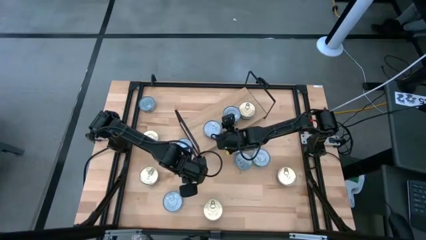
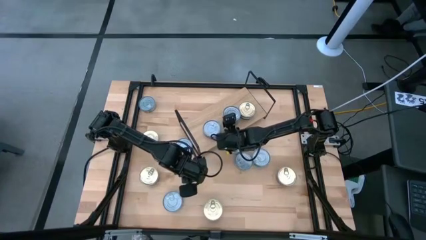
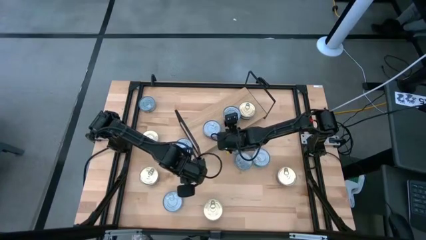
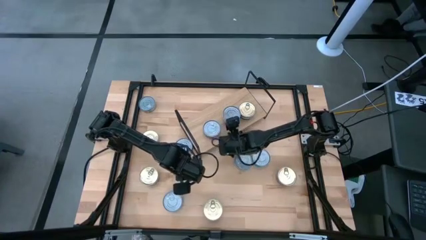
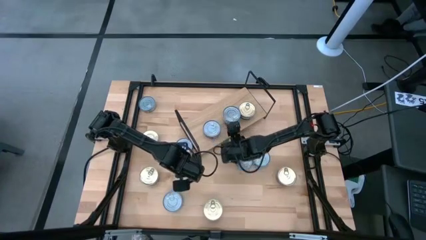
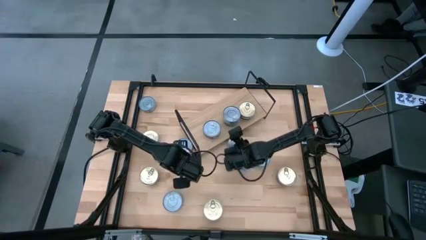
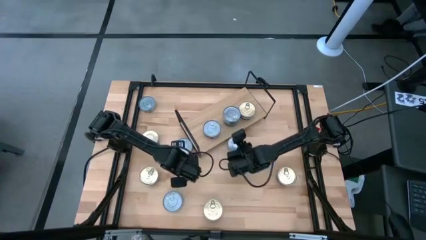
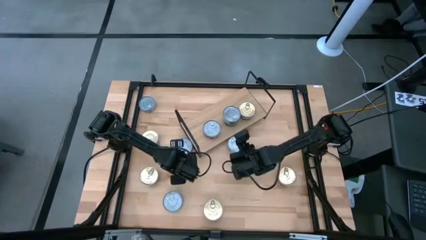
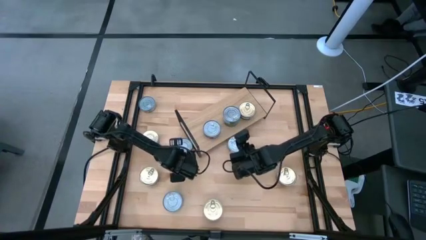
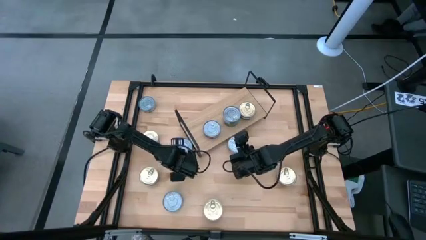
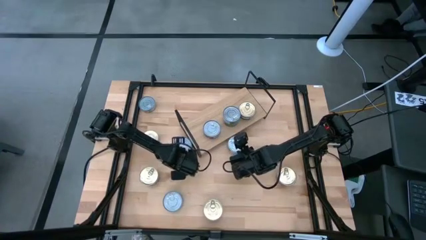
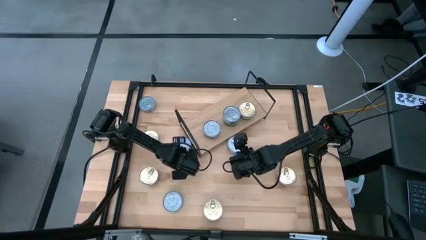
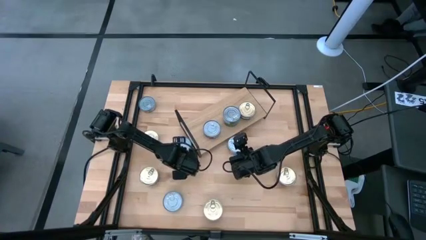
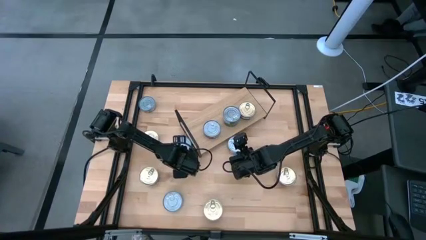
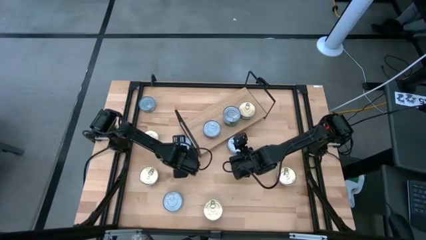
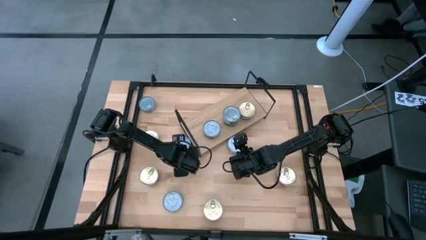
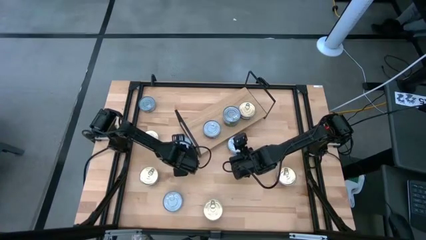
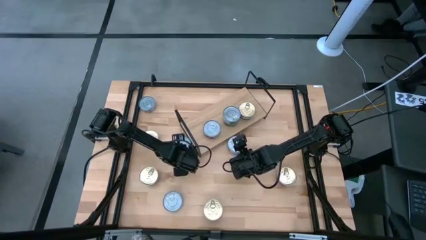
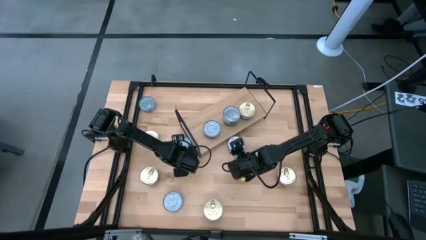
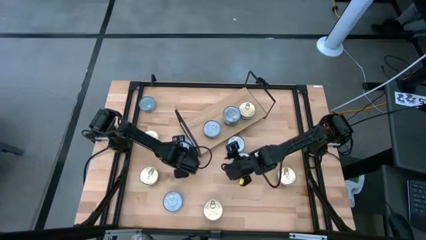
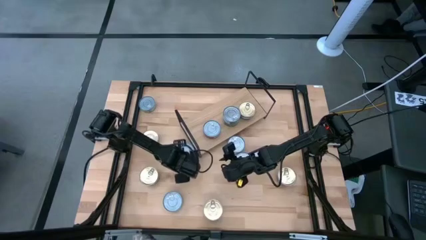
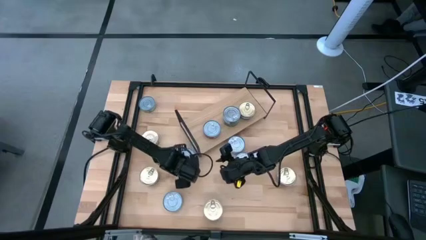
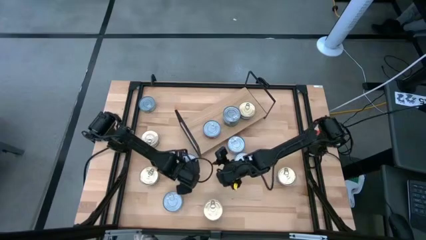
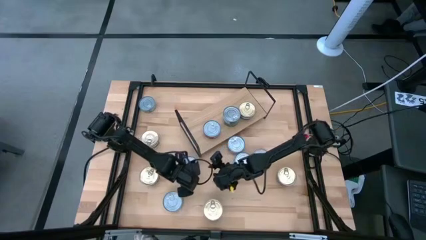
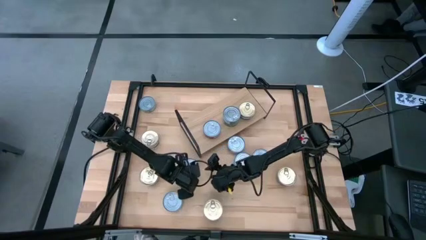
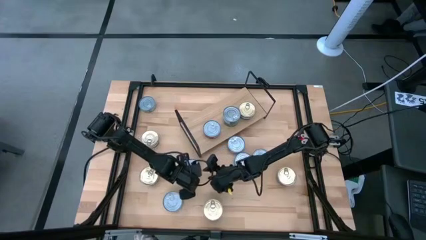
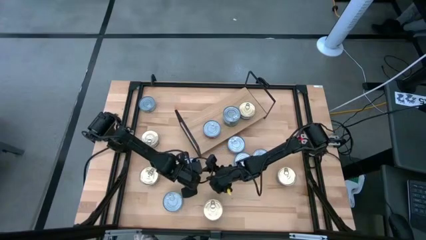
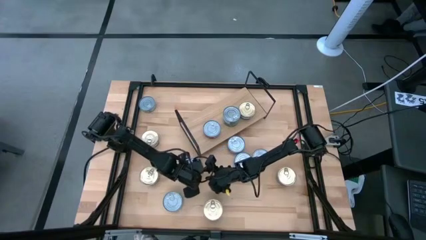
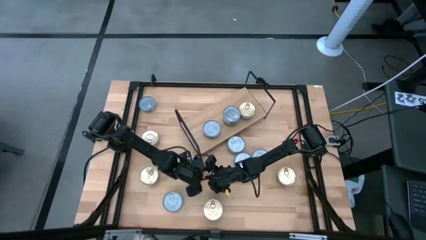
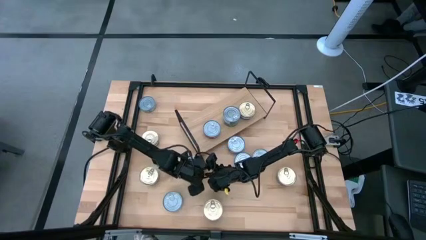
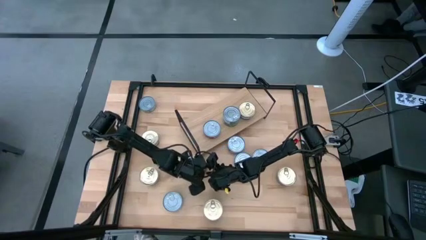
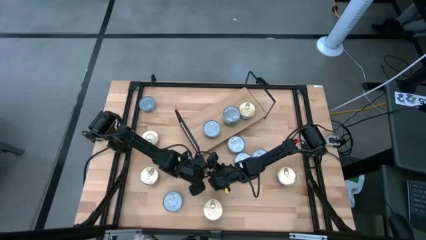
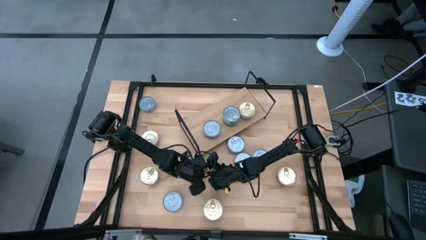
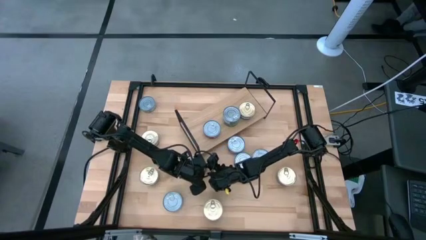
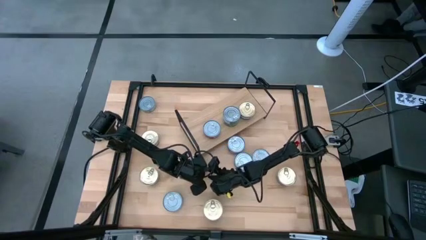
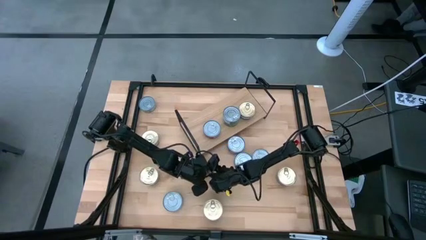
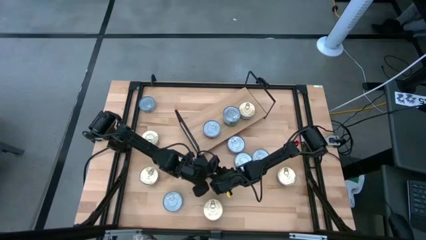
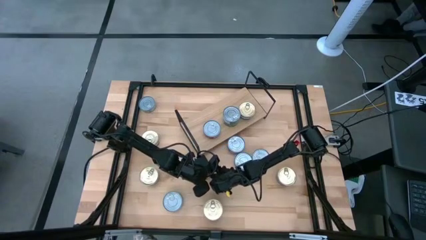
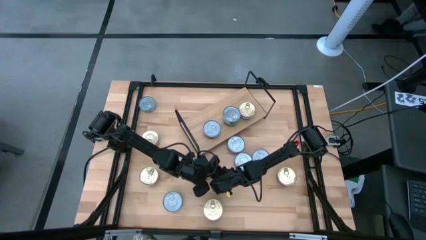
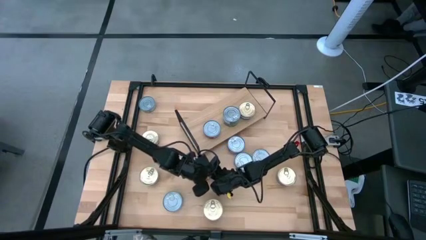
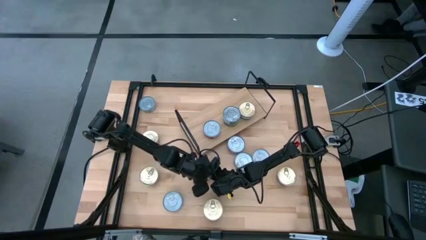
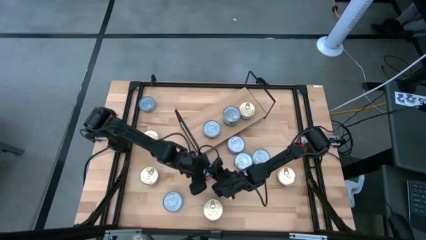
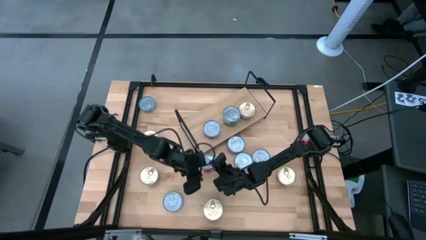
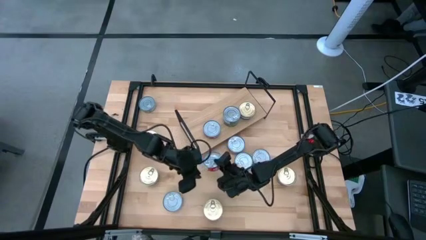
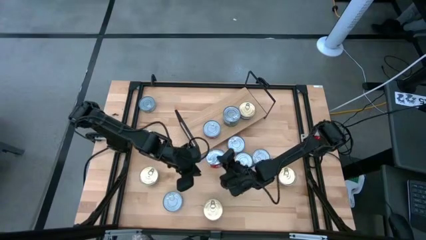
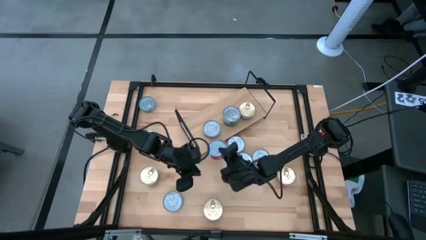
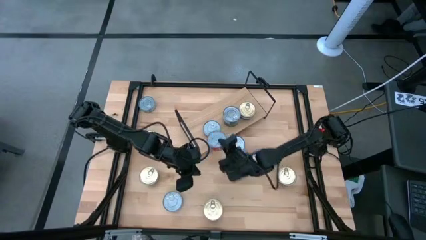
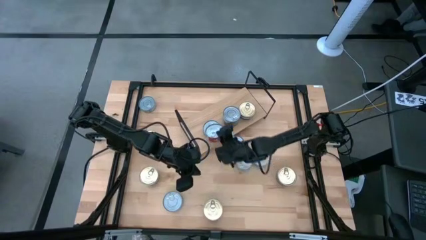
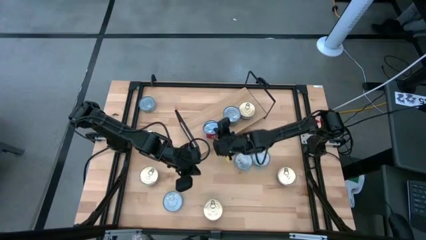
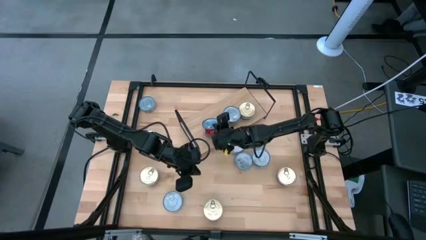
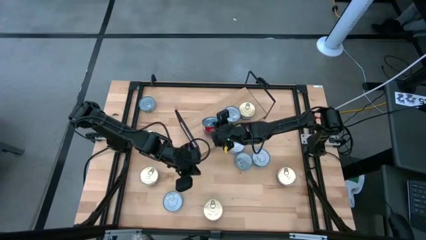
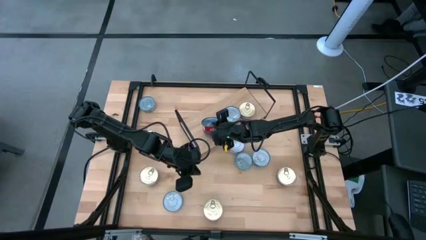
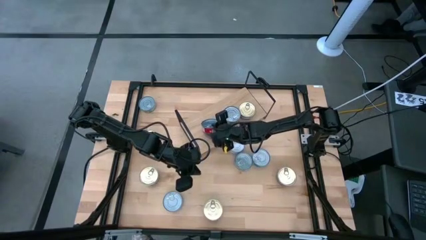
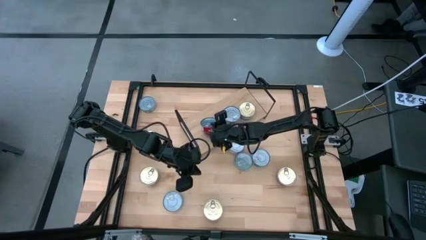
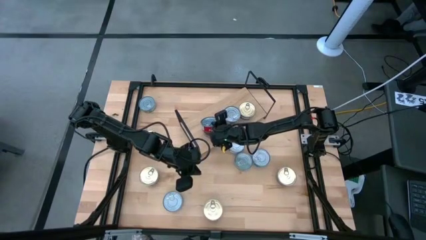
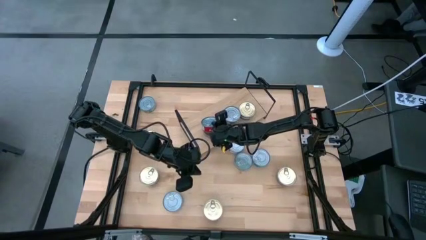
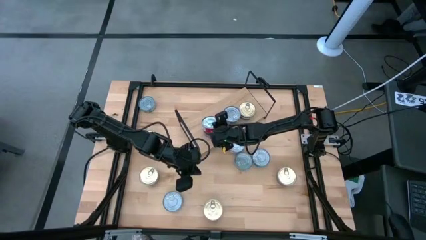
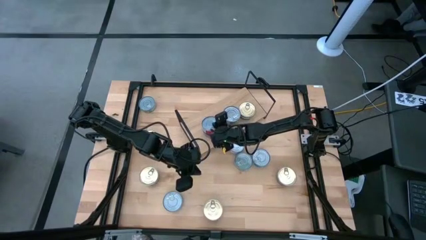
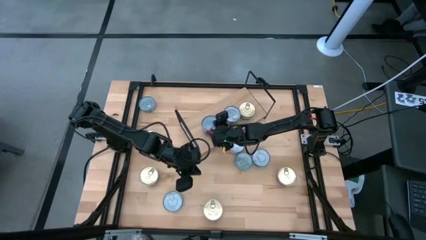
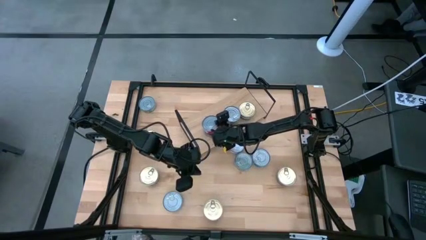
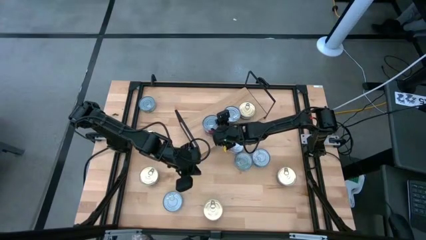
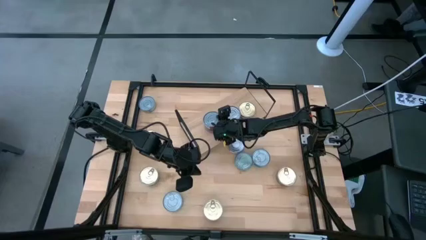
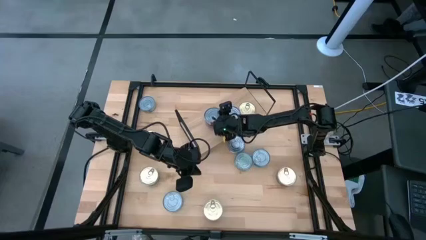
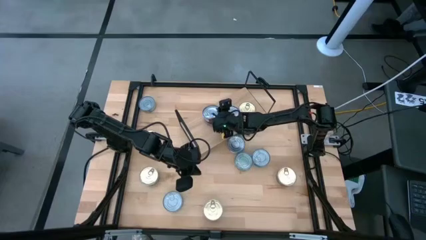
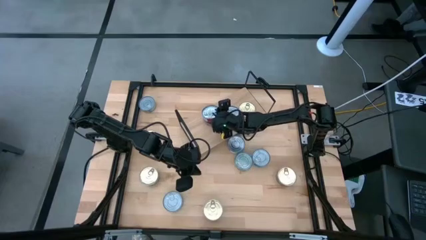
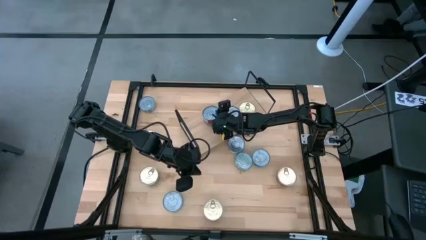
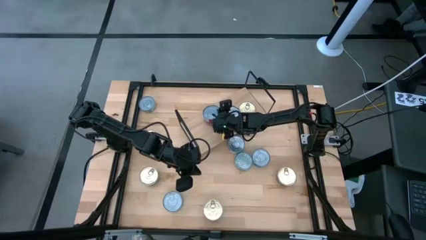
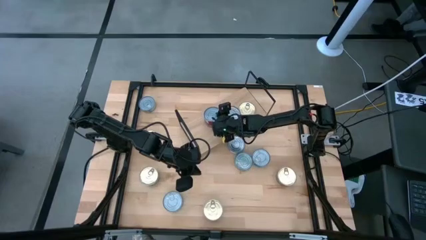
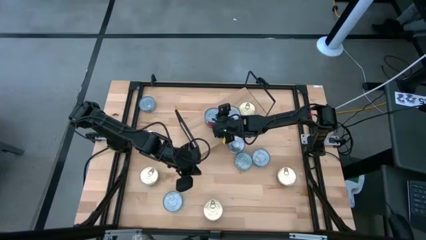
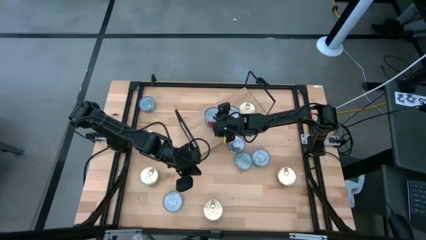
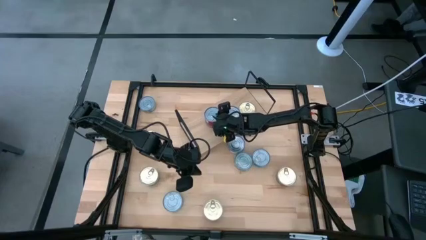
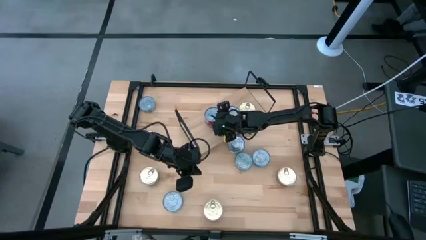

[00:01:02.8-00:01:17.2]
Task: Stack canned seafood by type on shelf
Stack the red tuna can on the shelf on top of the other red tuna can
